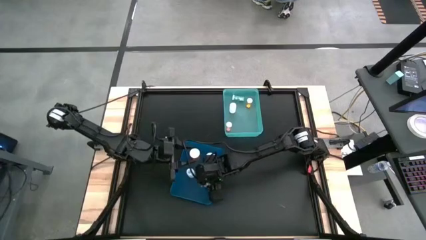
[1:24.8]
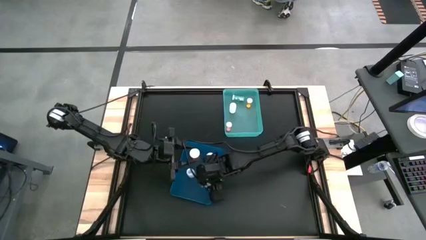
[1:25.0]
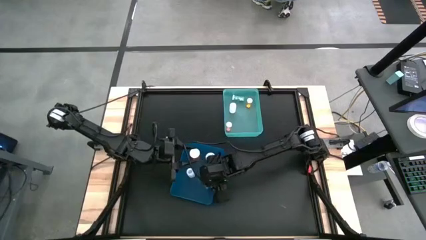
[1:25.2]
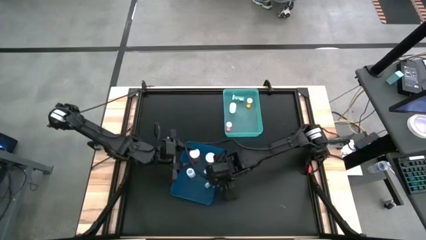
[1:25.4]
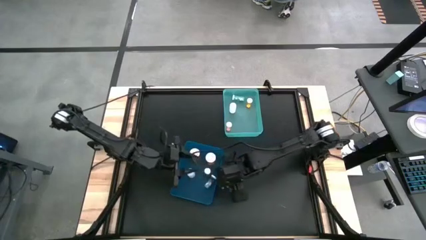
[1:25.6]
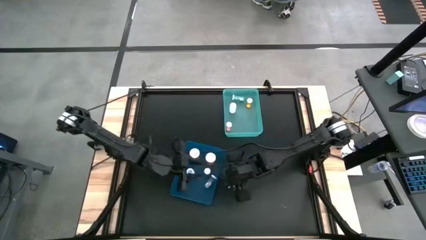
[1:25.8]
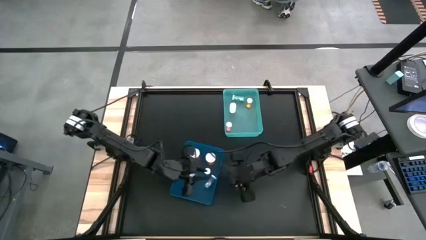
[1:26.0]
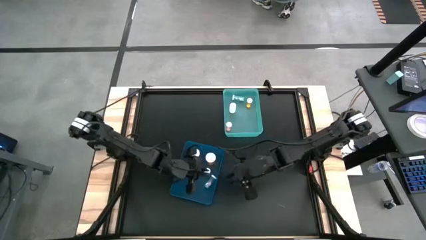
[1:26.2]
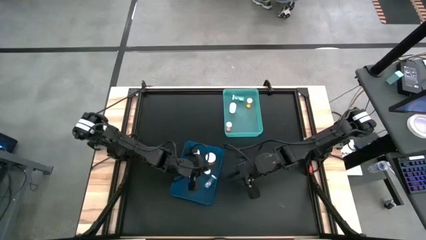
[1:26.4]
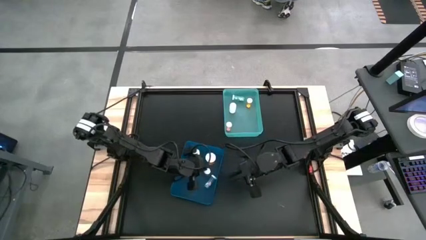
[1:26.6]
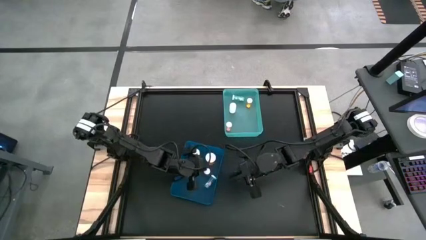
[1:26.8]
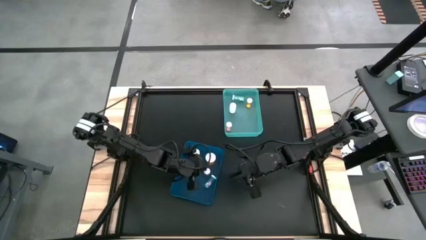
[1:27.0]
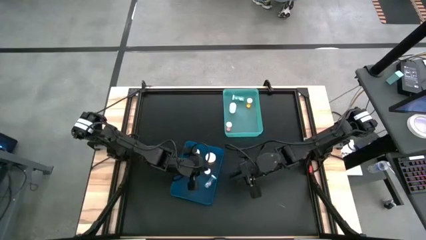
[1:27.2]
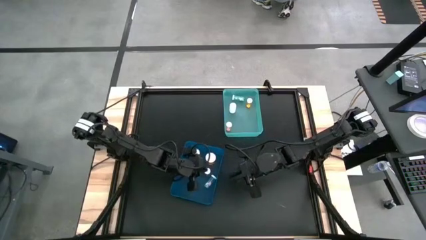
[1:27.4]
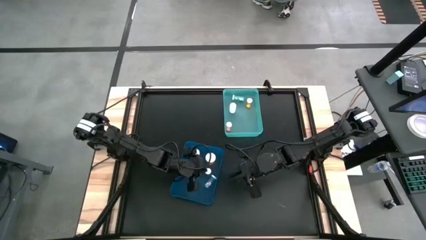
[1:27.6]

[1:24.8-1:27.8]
Task: Pick and place medicine bottles into bin by pill shape (circle, oval)
Adjust the green capsule bottle in the blue bin

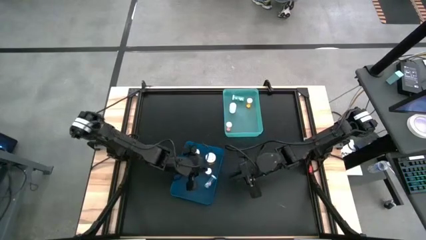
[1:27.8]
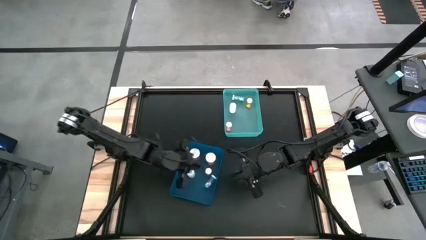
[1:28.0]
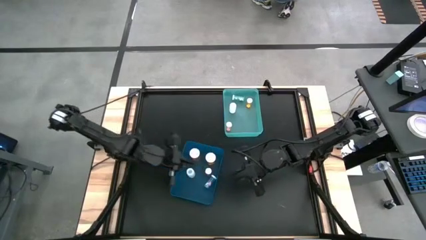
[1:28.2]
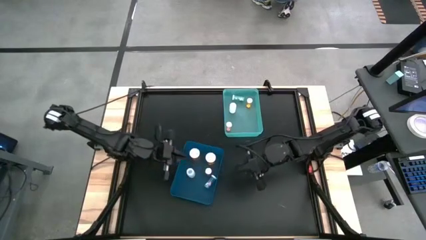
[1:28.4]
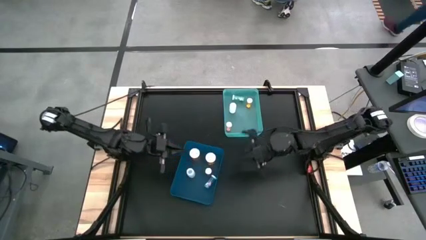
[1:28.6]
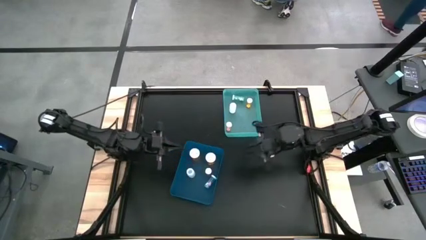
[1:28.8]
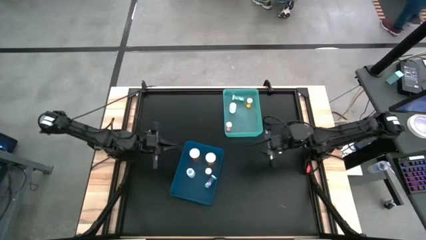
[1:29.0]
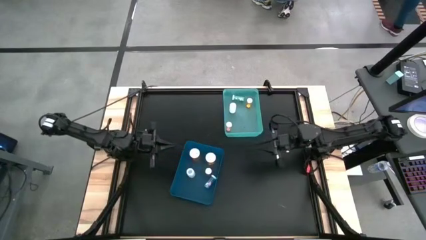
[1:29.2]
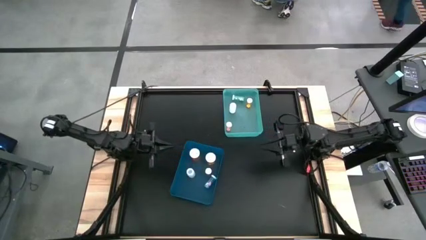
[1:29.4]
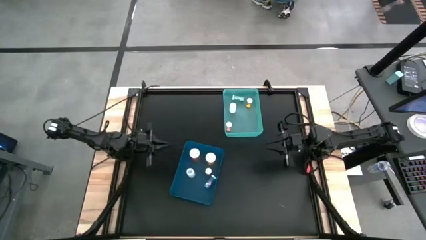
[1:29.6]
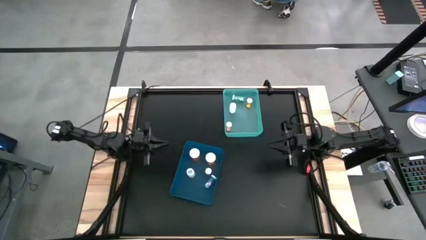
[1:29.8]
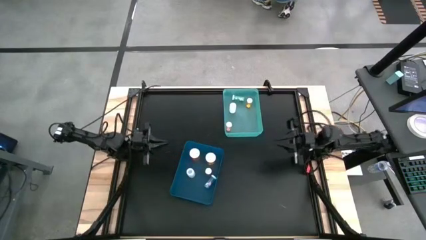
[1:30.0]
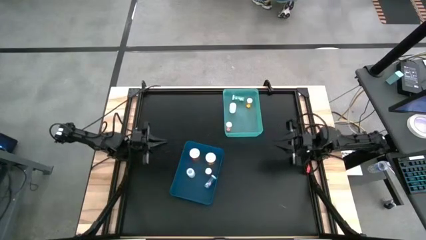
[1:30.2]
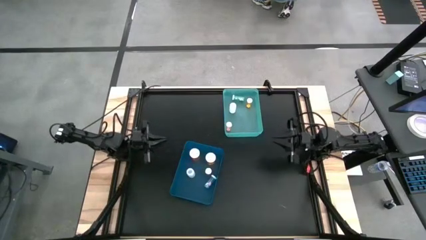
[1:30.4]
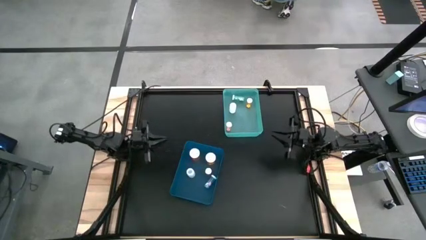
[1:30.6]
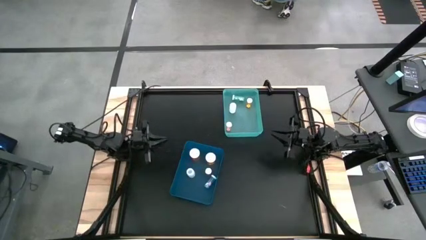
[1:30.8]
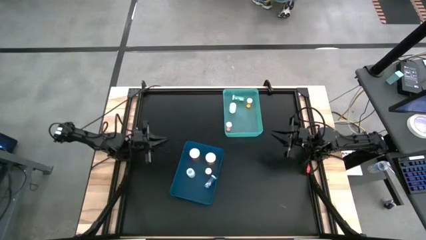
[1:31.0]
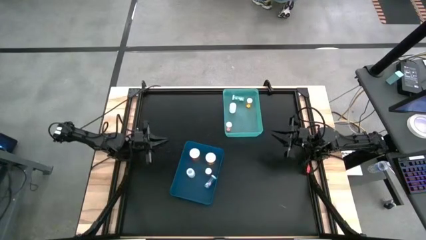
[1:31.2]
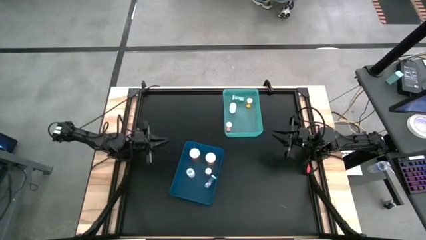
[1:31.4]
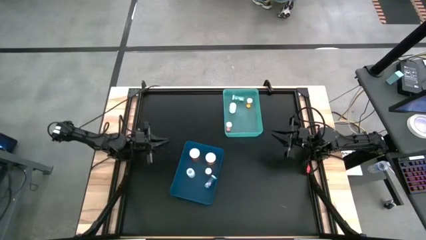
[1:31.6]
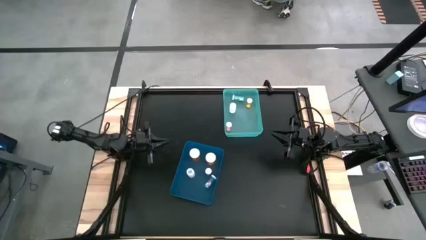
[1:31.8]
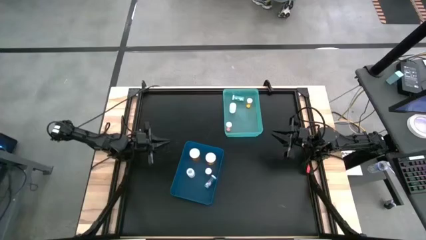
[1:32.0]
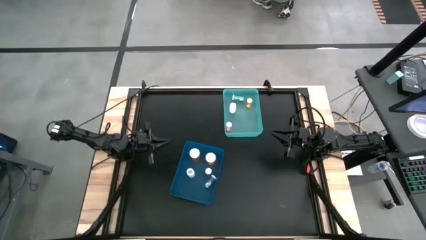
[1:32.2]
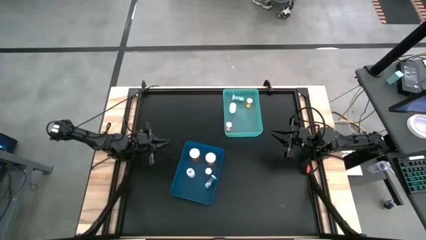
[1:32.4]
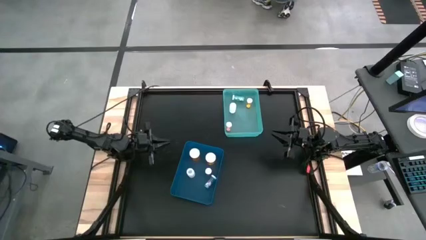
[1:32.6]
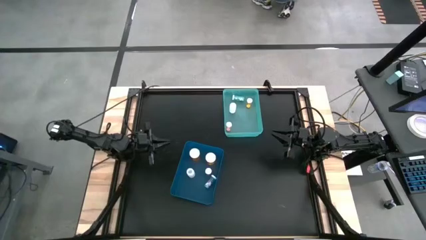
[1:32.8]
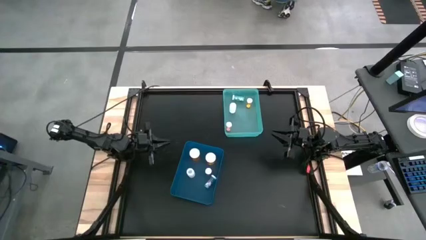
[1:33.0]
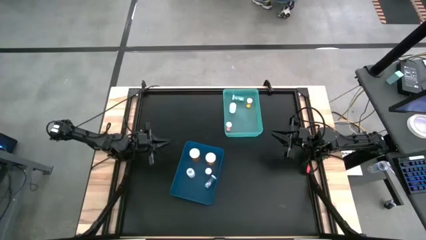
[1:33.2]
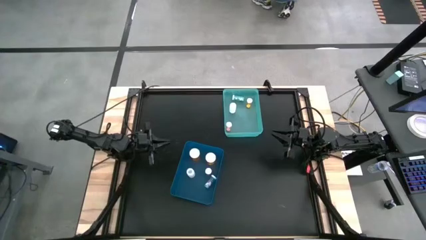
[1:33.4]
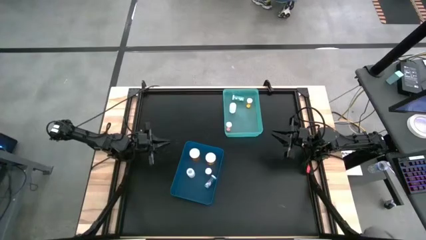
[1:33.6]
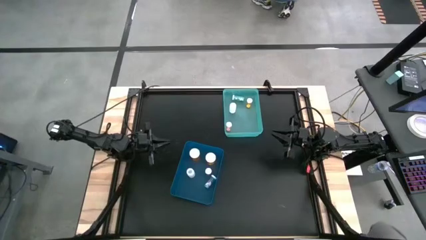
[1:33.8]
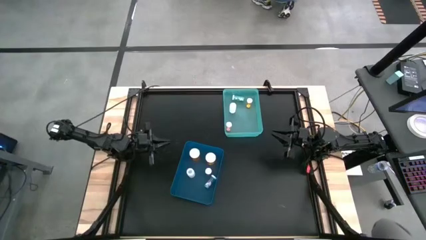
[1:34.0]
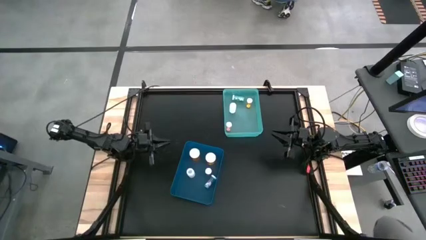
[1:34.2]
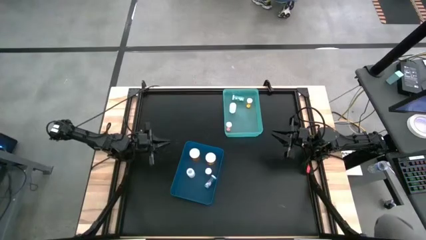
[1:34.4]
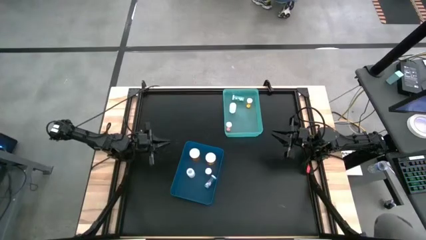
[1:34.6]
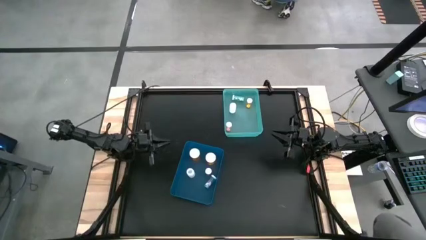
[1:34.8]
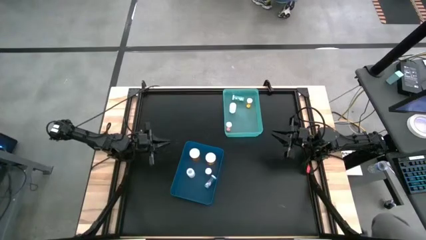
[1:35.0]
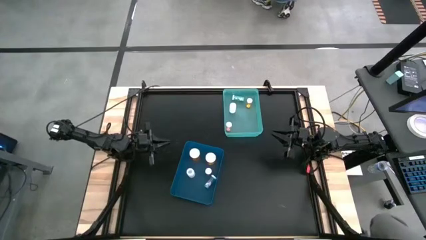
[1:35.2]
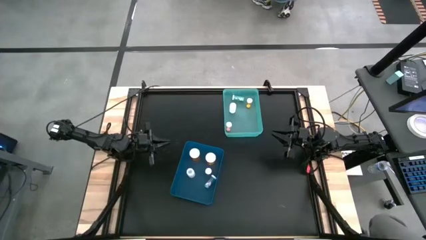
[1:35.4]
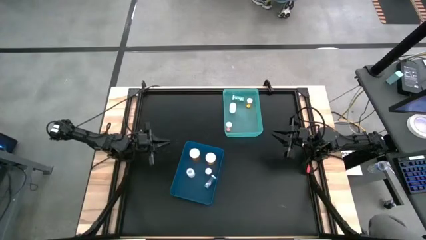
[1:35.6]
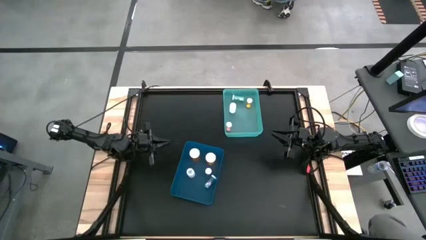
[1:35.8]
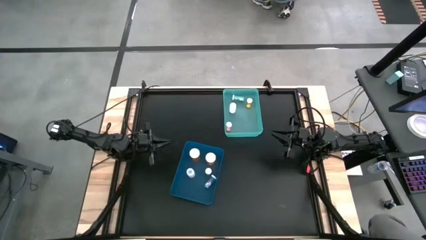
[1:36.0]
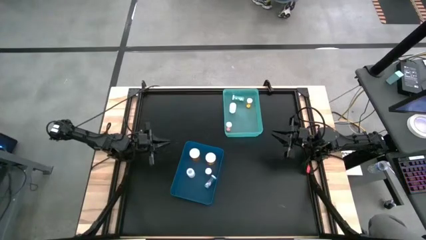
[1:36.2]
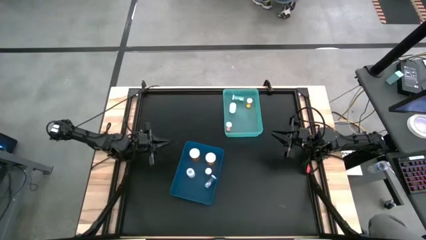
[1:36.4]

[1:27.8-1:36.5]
Return to Home Position

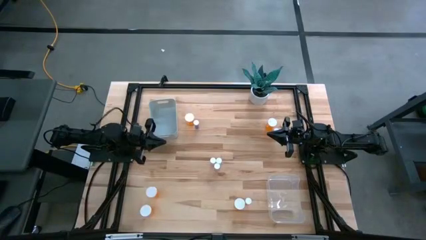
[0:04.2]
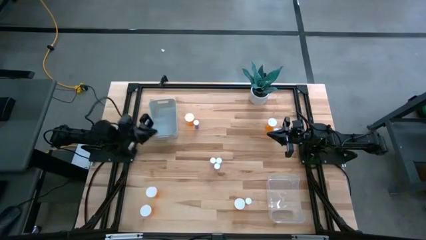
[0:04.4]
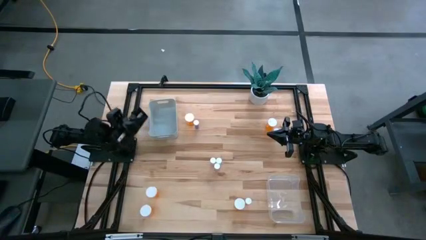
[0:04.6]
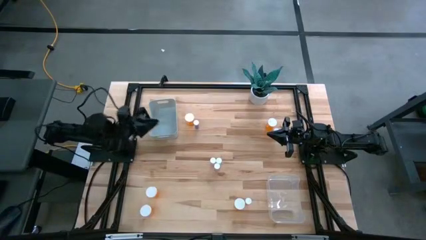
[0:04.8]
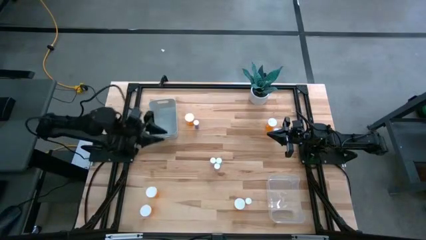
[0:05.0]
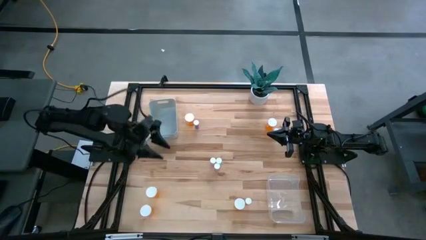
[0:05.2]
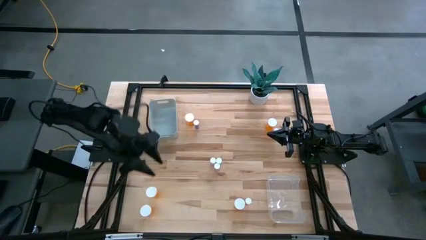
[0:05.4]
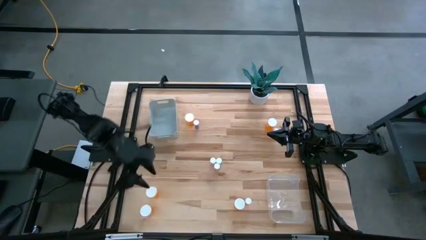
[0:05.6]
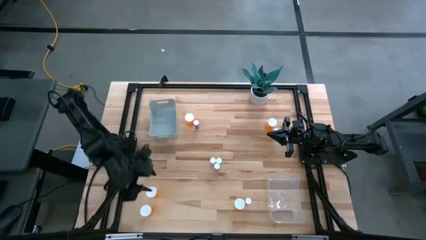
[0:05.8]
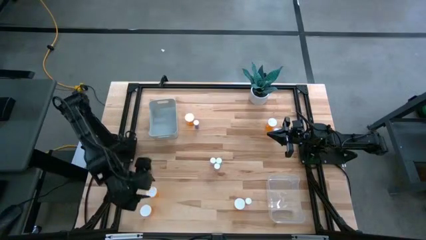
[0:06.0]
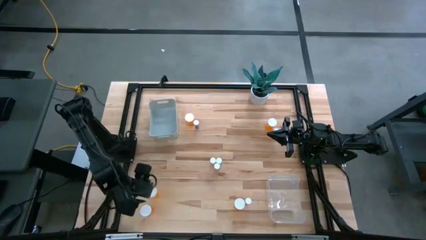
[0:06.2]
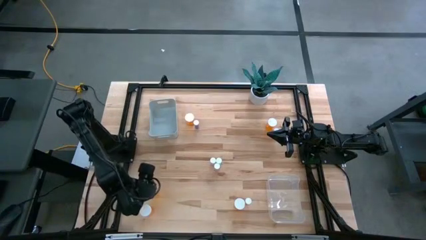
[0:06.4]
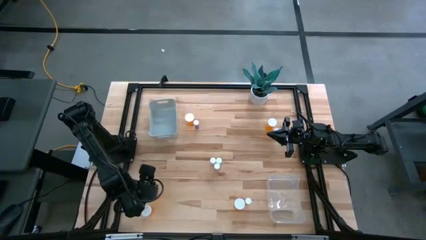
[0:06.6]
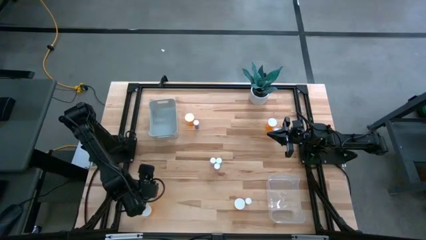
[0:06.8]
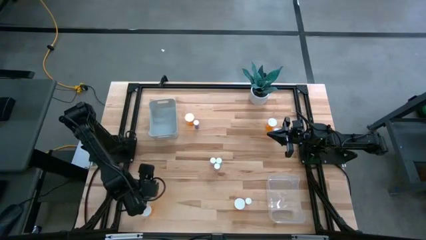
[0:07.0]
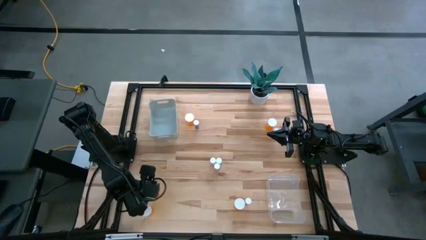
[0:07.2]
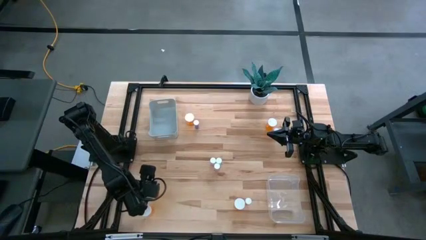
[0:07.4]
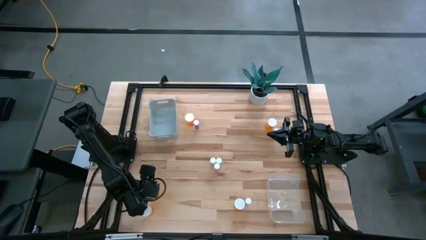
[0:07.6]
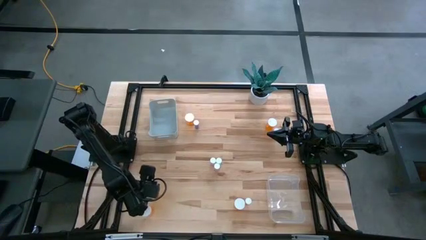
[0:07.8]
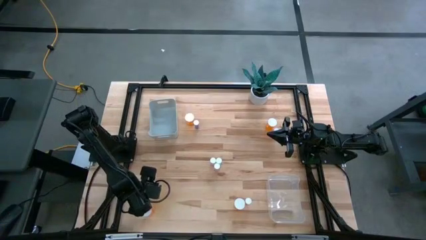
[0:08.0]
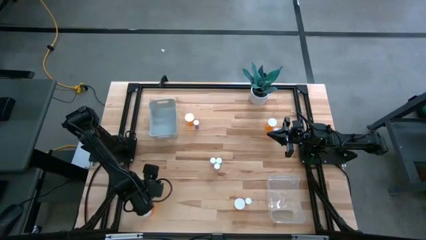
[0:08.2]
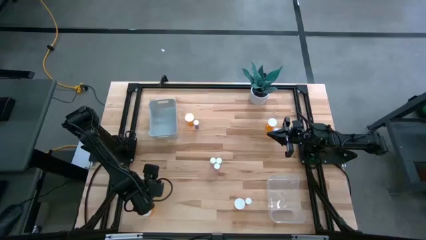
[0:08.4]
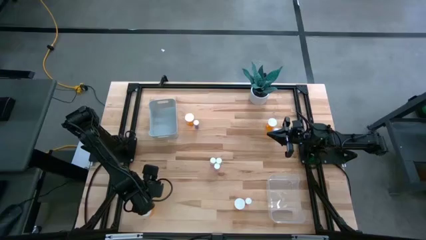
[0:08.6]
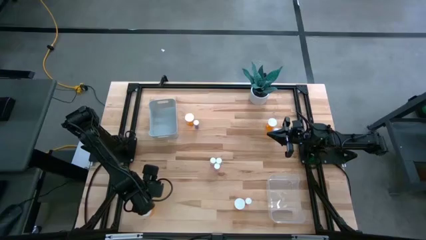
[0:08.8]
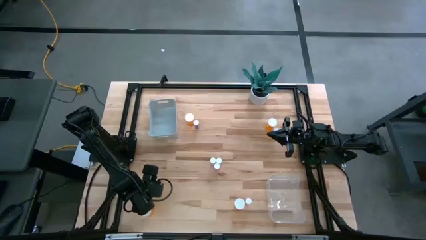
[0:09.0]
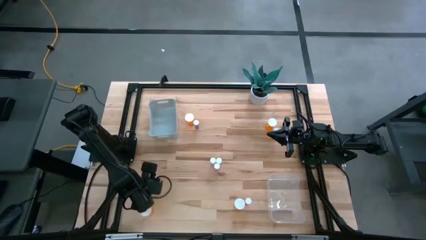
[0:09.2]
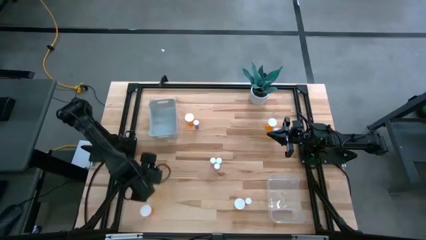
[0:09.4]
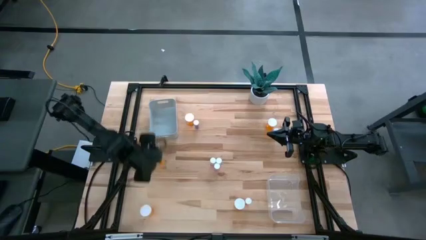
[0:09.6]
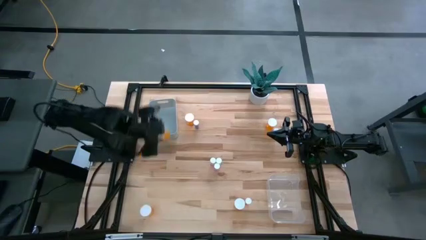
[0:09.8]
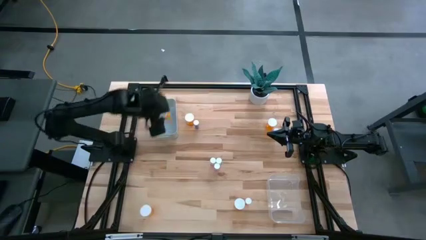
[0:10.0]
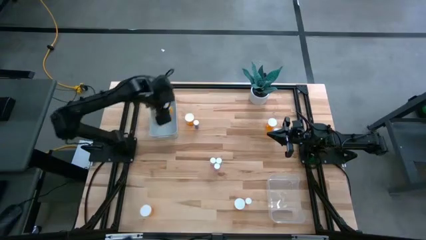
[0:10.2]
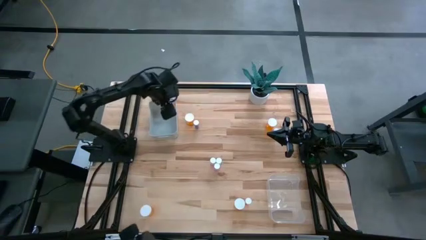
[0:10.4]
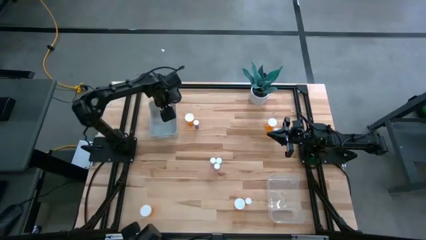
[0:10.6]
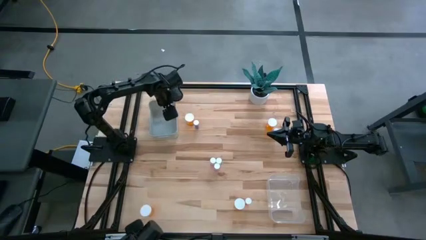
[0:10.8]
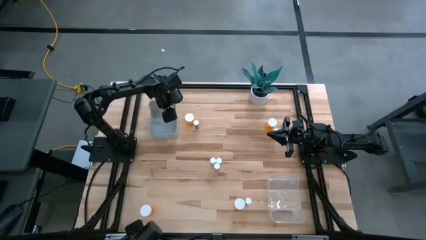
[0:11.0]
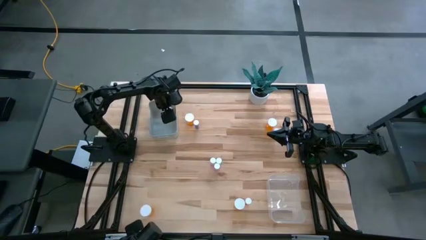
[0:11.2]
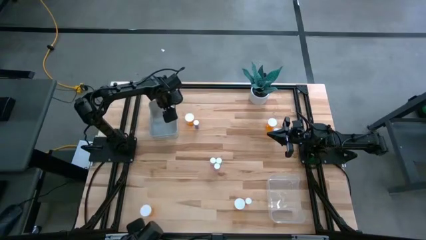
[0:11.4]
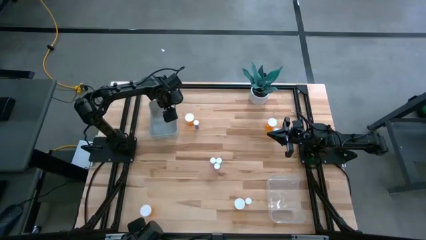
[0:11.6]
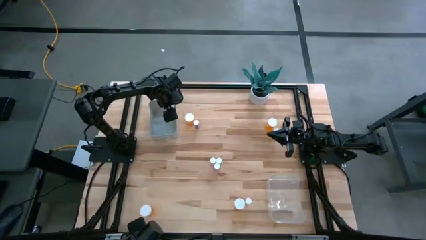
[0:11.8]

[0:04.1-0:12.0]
Task: Pick and place medicine bottles into bin by pill shape (circle, oval)
Put the orange capsule bottle into the gray bin
